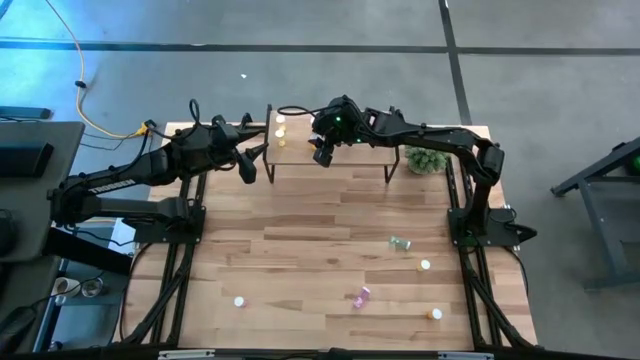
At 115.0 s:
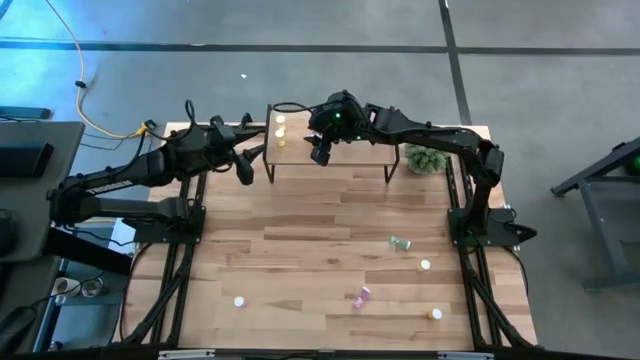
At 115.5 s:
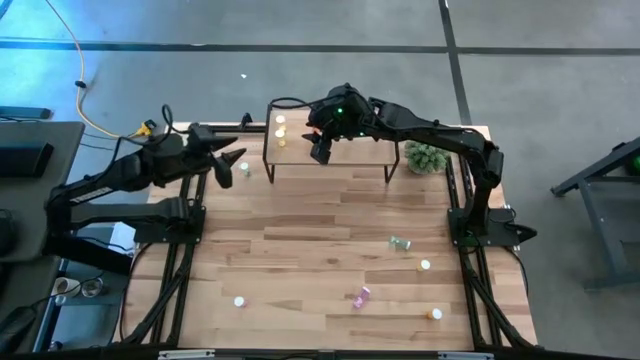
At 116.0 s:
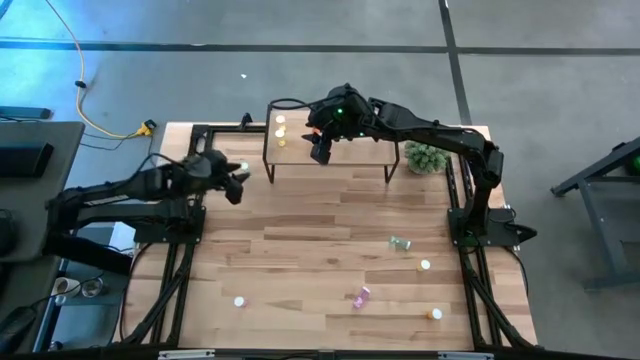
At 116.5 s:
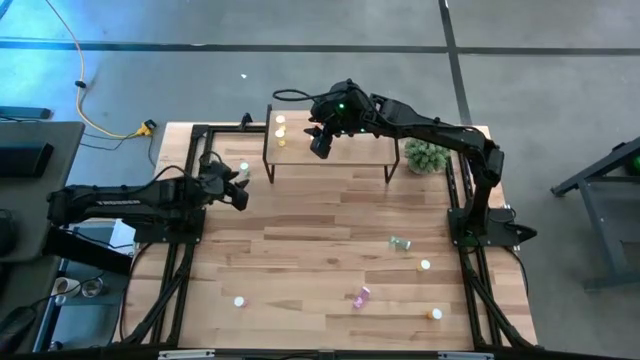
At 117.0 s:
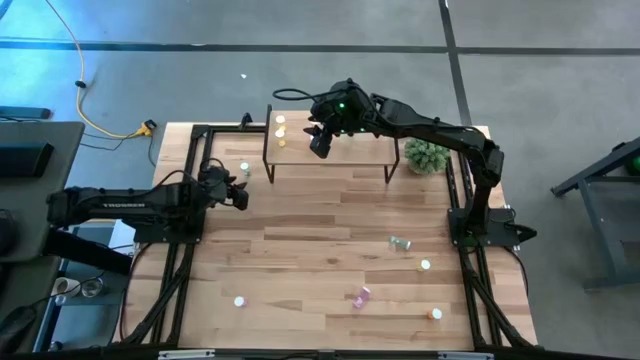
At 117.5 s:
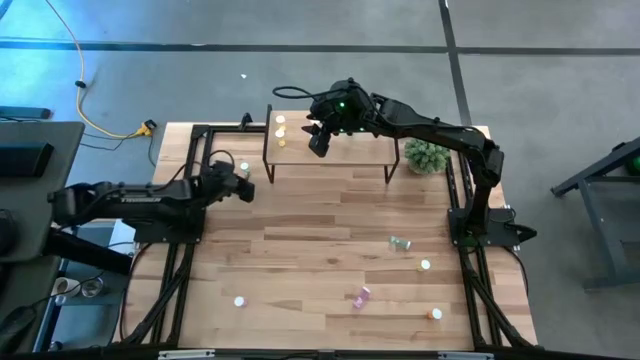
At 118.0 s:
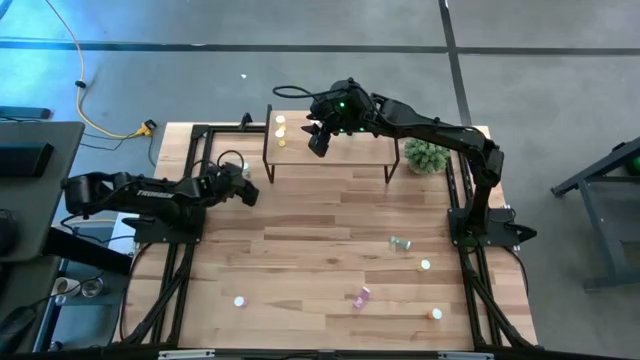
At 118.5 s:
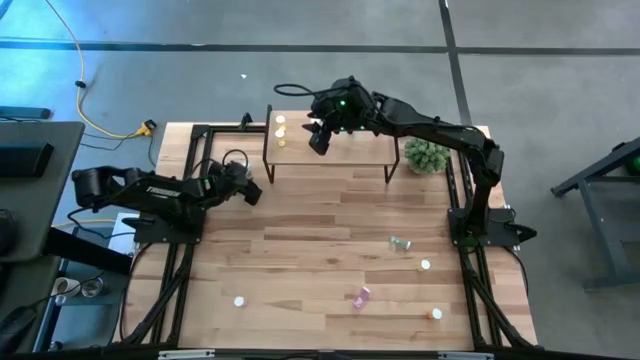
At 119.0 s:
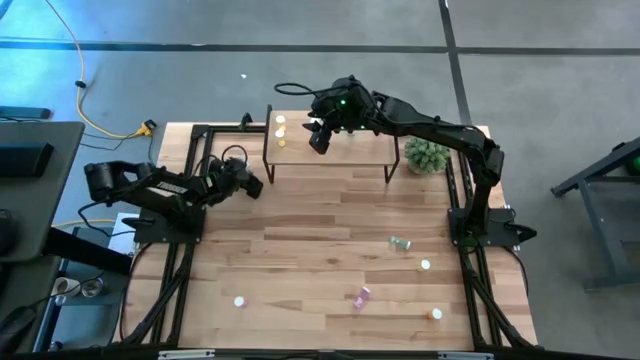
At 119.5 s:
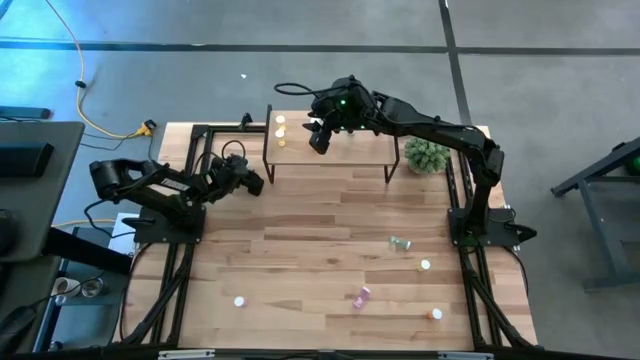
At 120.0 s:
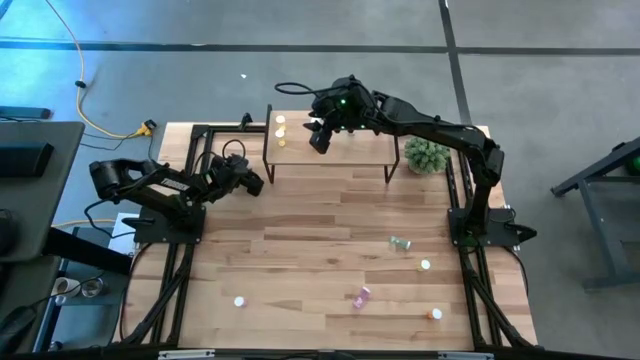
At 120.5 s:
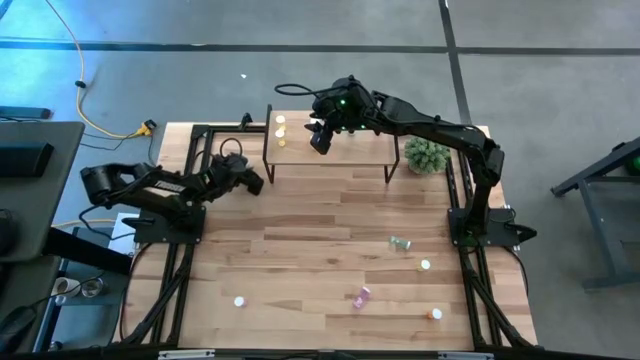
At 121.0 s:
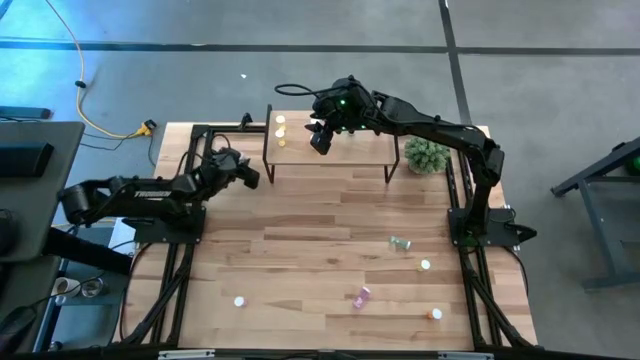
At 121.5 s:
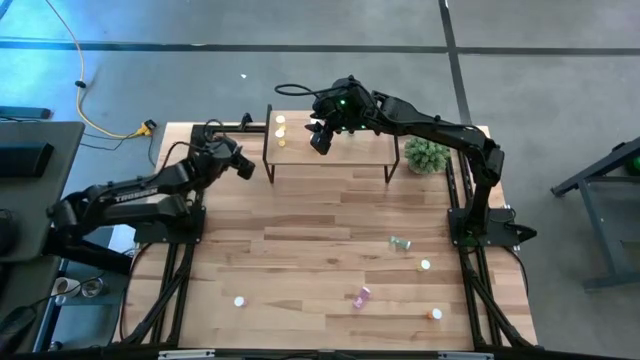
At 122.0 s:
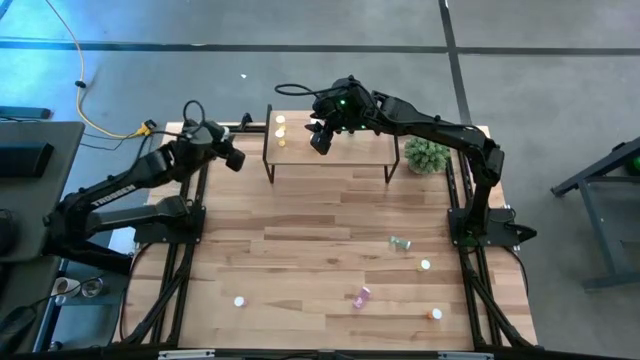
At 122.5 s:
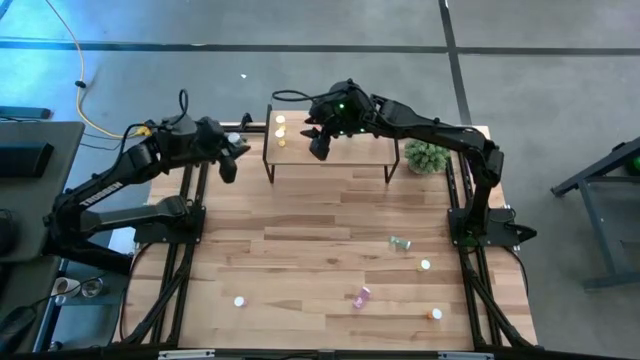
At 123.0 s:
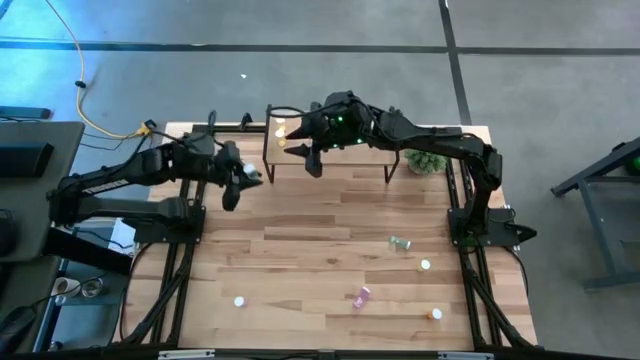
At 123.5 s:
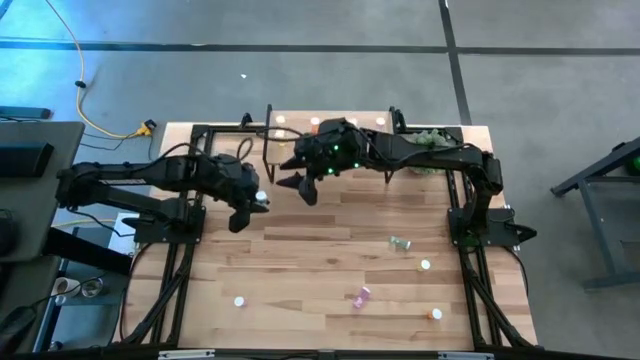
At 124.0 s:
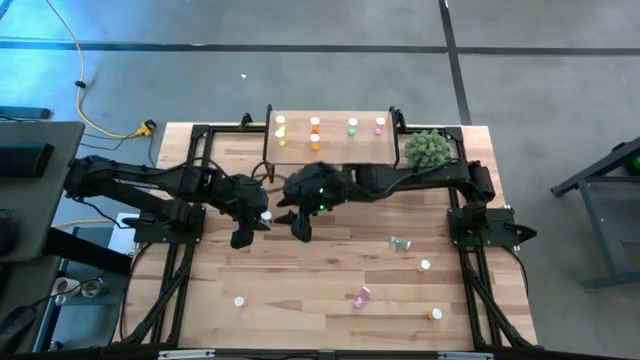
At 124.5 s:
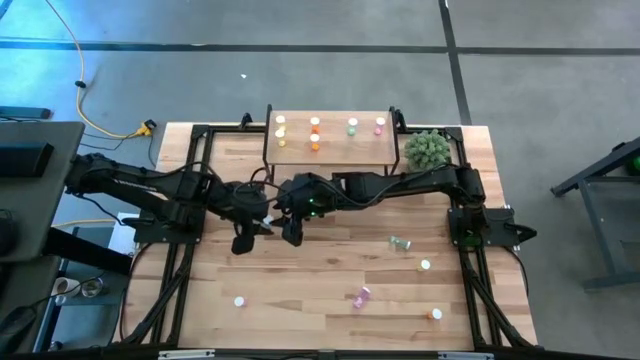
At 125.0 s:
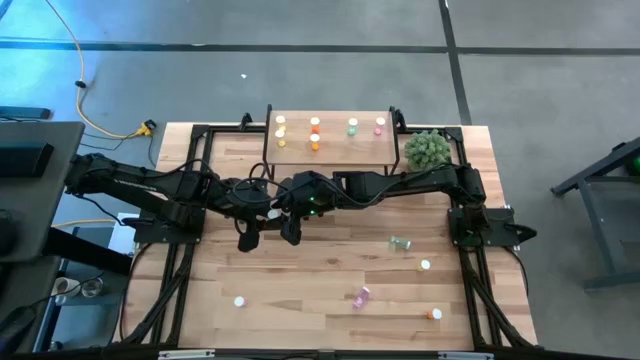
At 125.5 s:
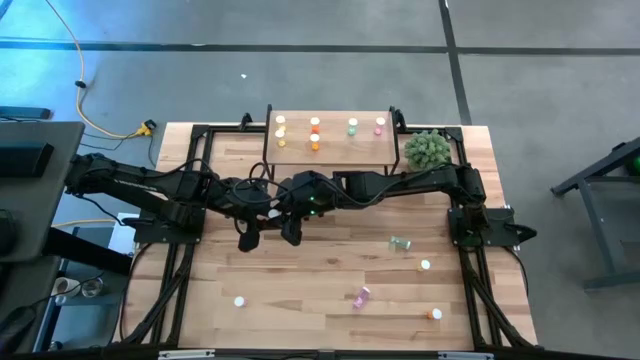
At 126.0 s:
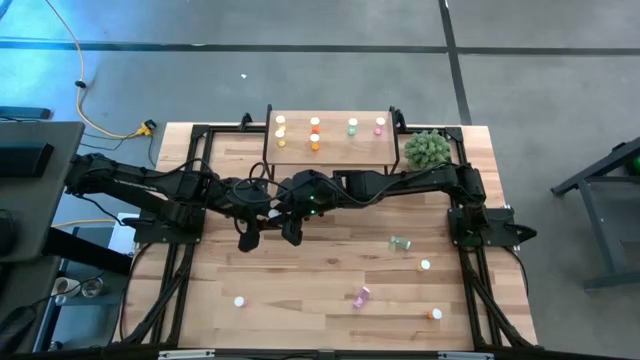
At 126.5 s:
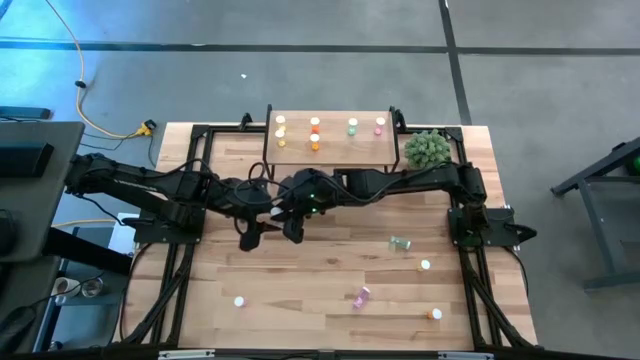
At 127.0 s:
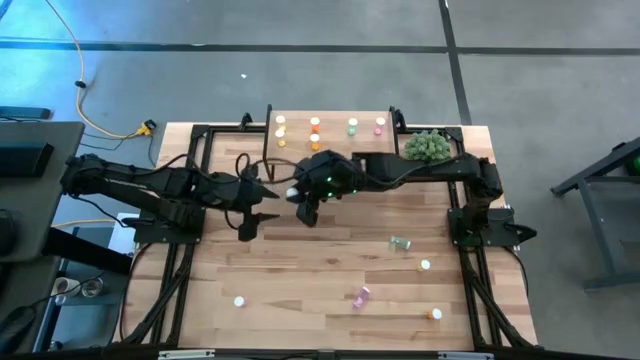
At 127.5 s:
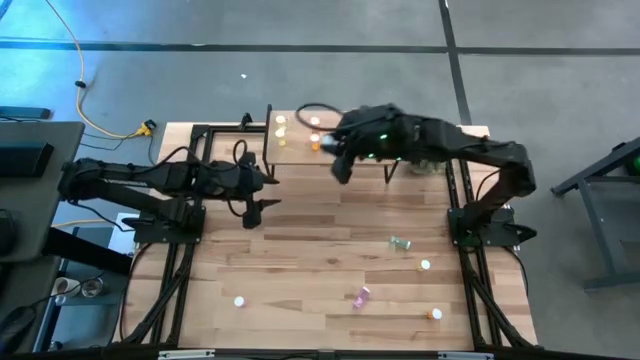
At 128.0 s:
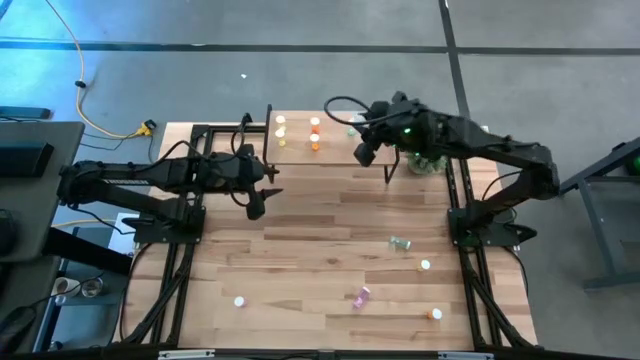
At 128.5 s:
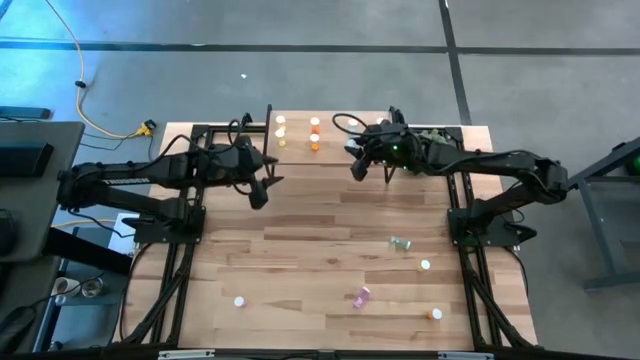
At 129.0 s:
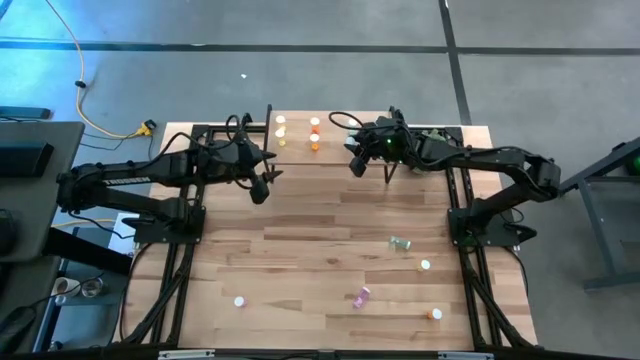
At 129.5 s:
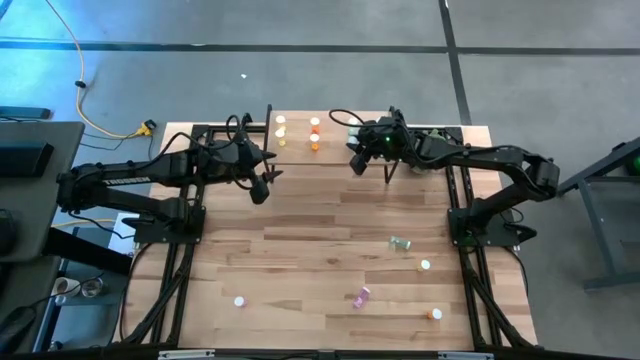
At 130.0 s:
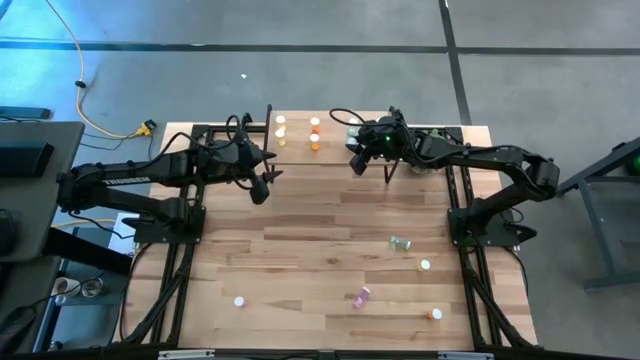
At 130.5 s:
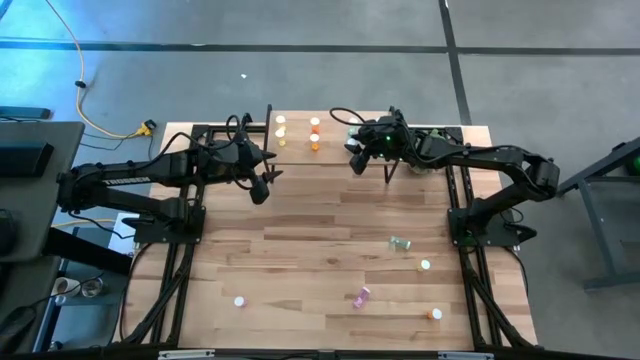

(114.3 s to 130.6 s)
Task: Pick and place medicine bottles onto shelf by color
Put the top blue pill bottle on the shelf aligned with the other blue pill bottle

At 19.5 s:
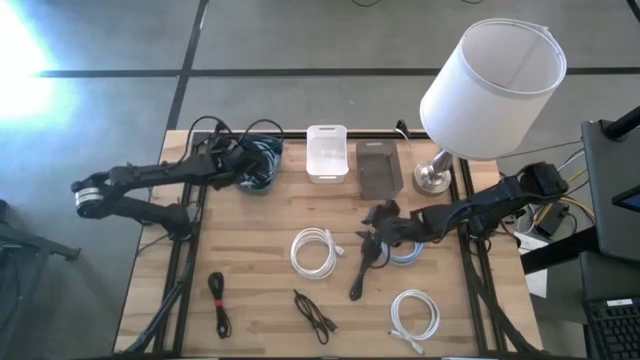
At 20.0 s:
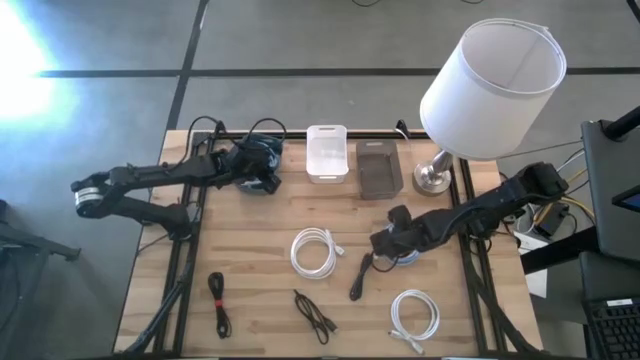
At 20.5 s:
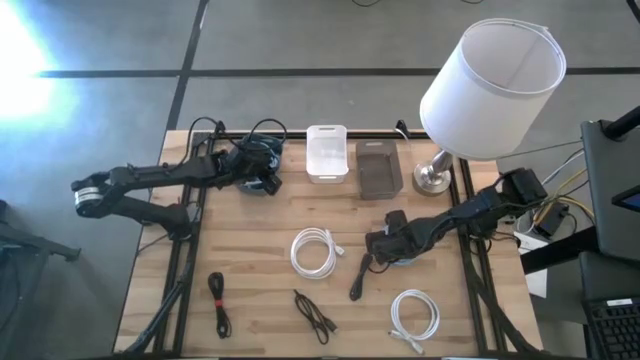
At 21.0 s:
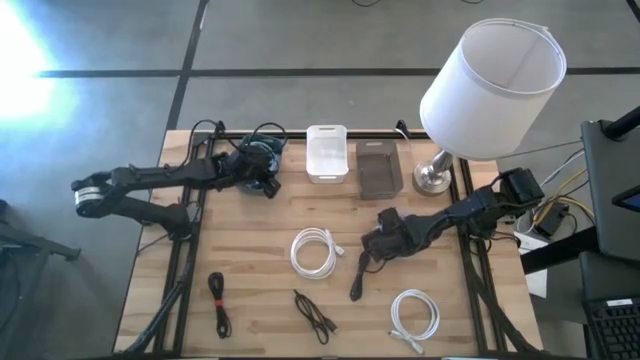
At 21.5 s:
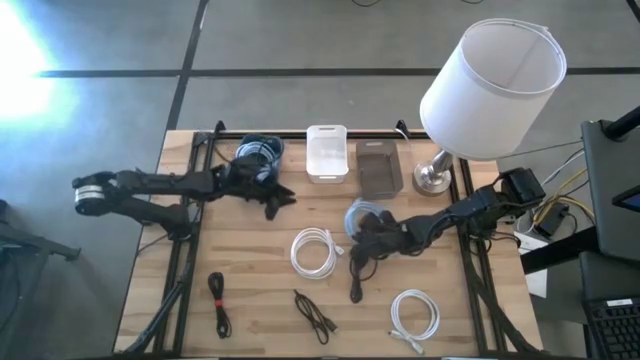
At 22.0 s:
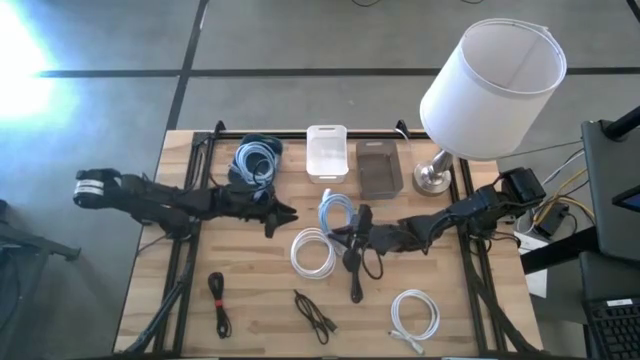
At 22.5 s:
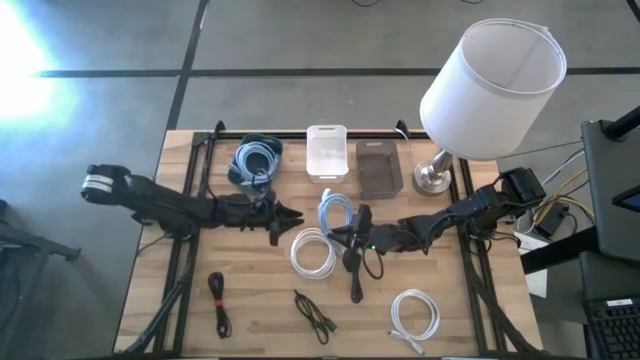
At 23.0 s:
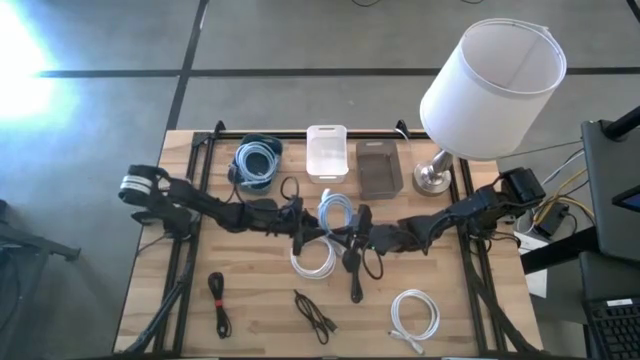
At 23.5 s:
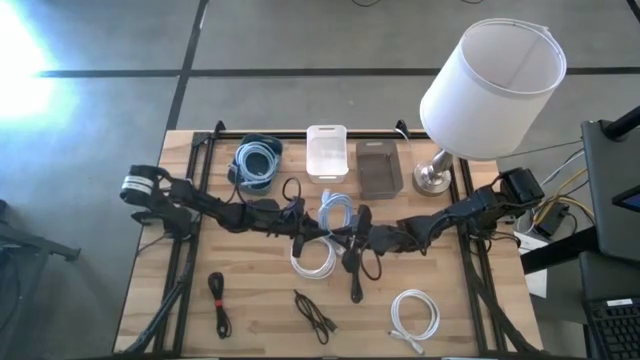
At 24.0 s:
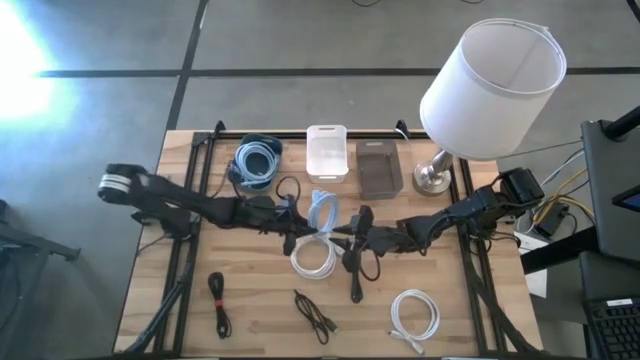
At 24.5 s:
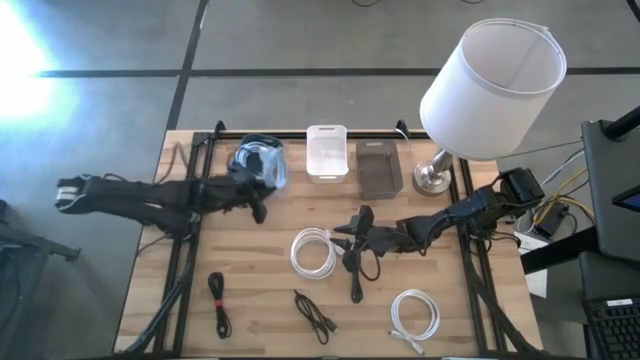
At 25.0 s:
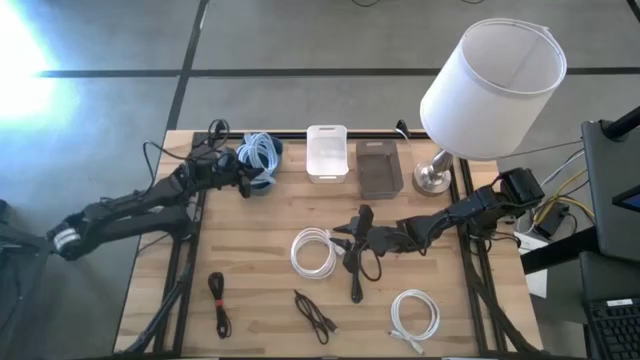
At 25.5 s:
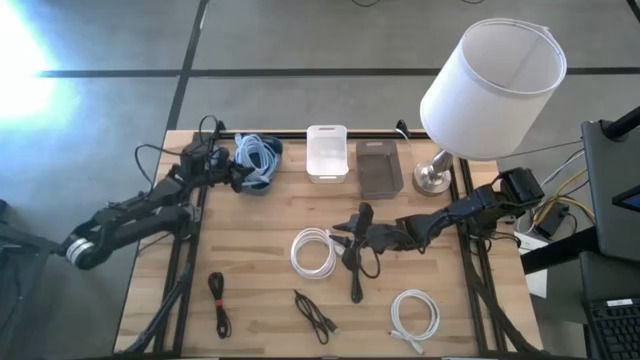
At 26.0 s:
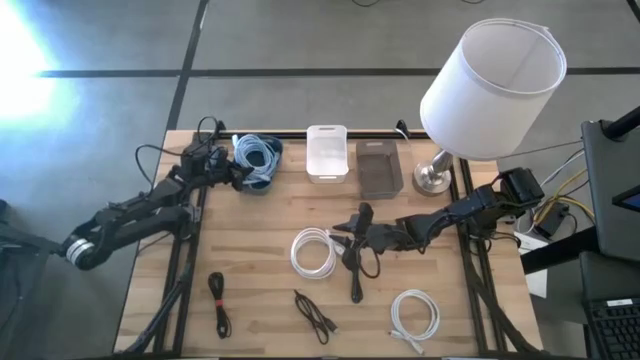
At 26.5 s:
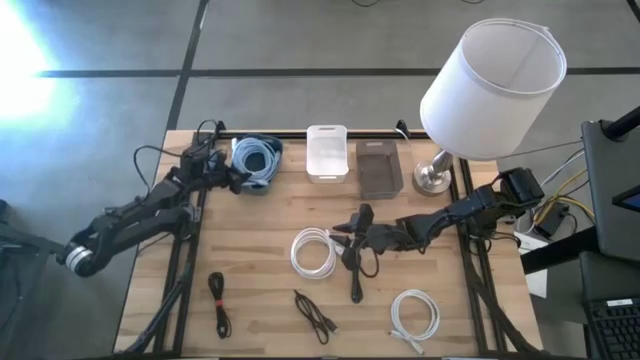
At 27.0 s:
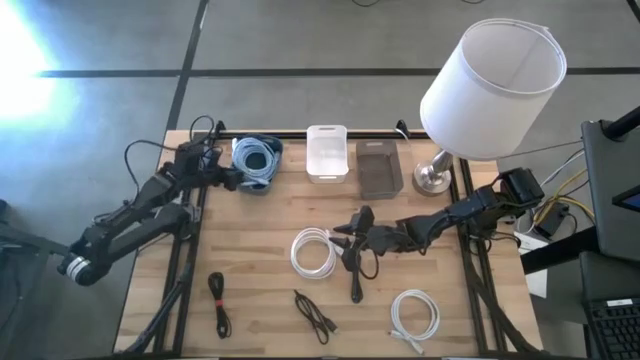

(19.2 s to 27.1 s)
Task: Pick & Place USB Port
Put the blue HDMI cable into the blue bin
